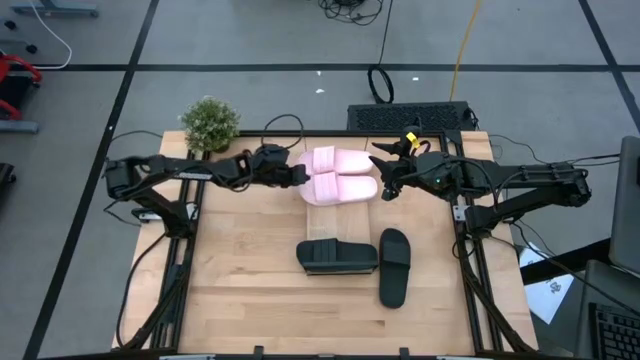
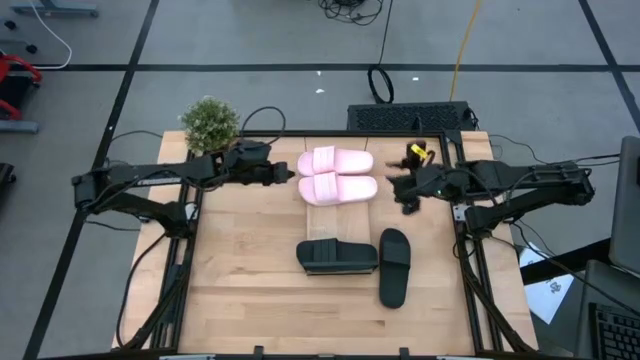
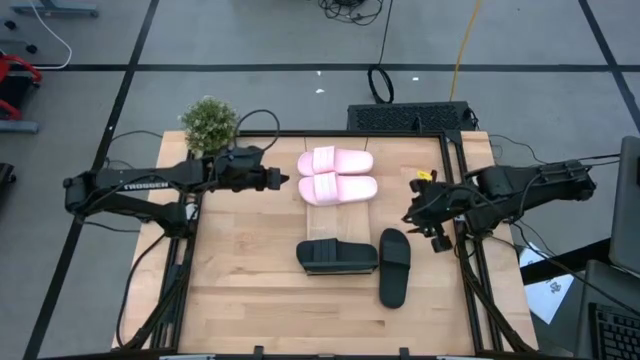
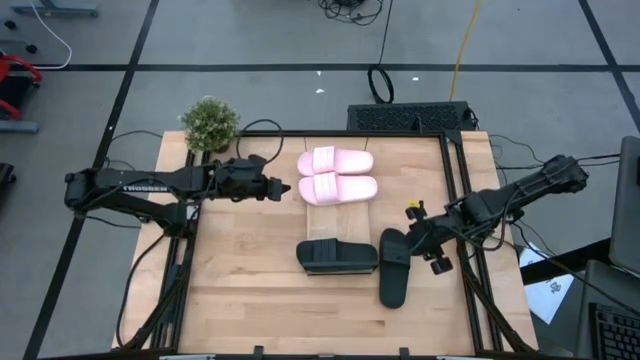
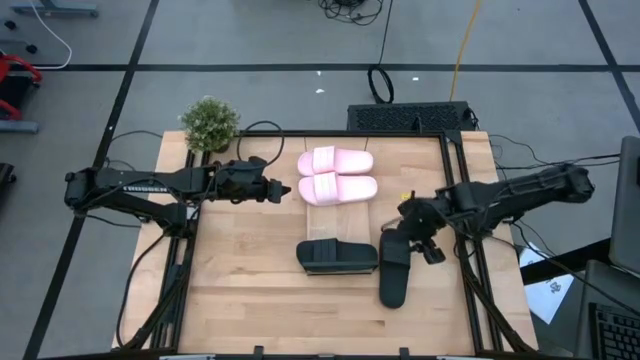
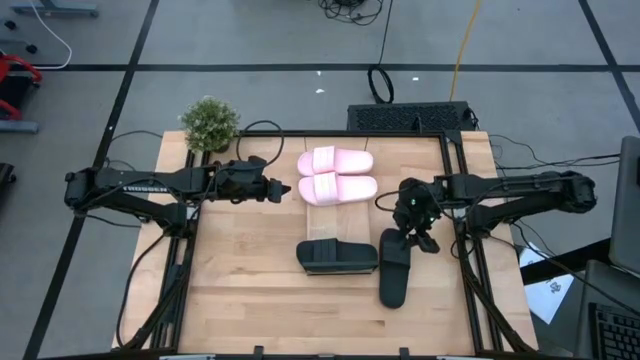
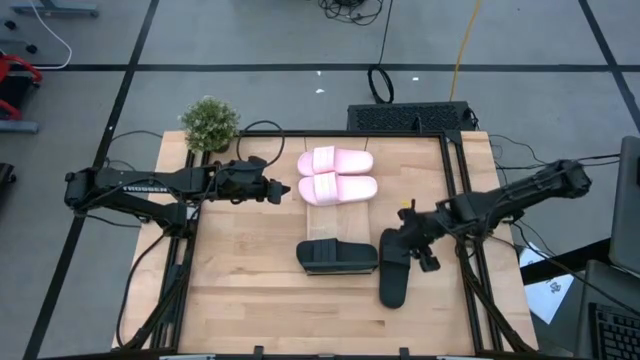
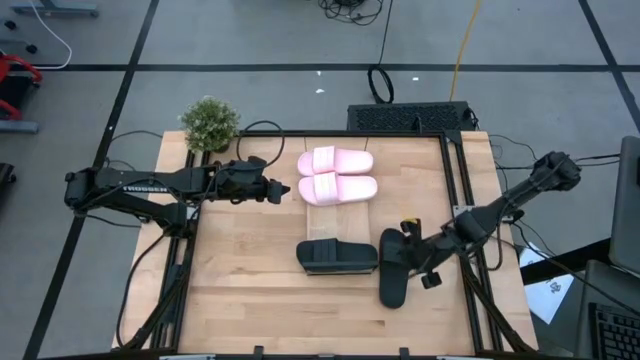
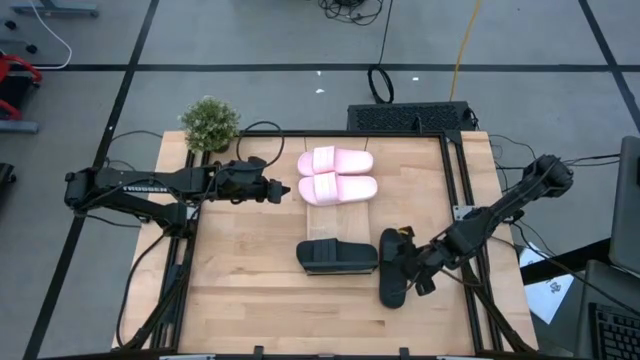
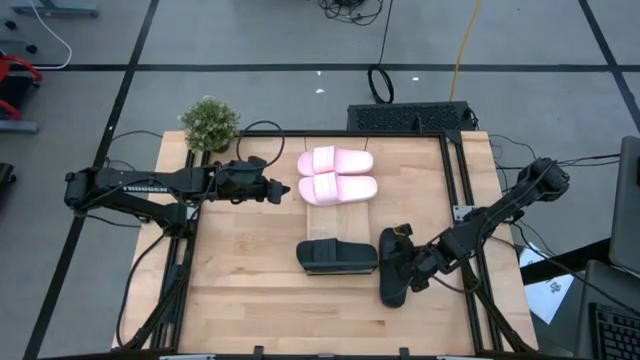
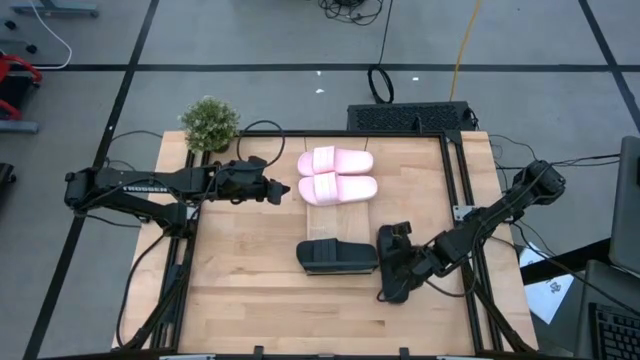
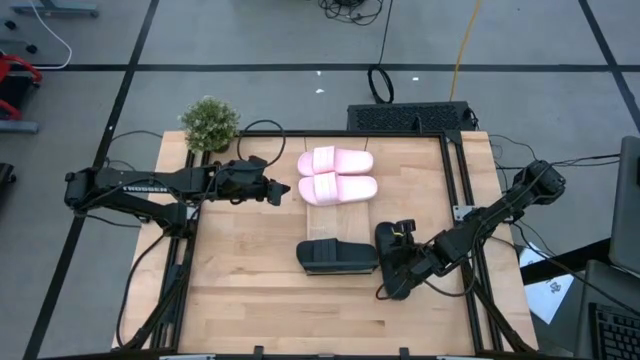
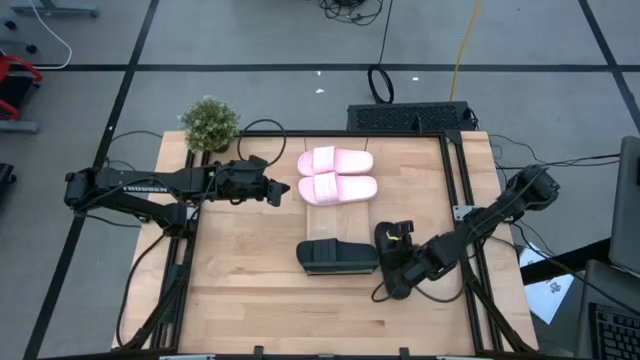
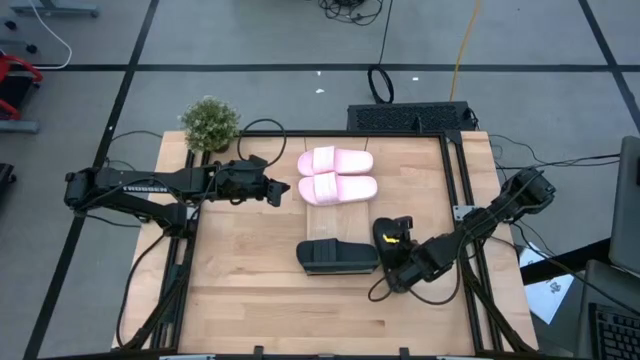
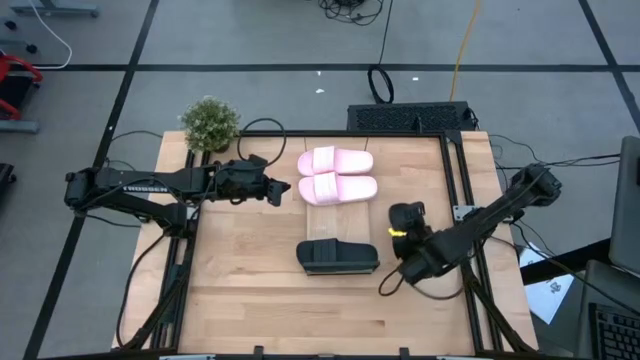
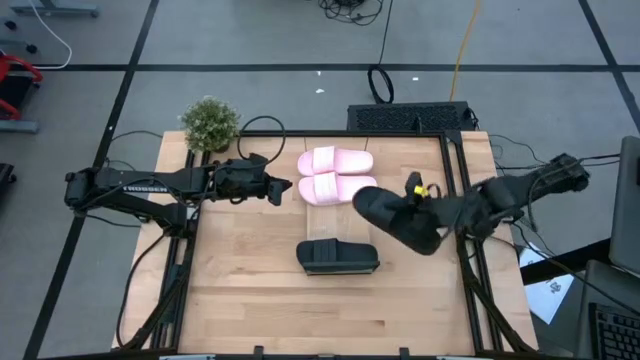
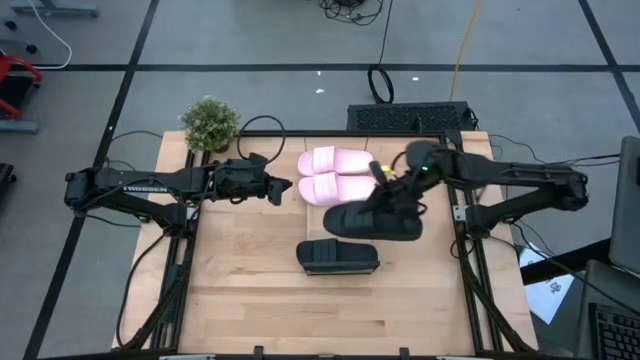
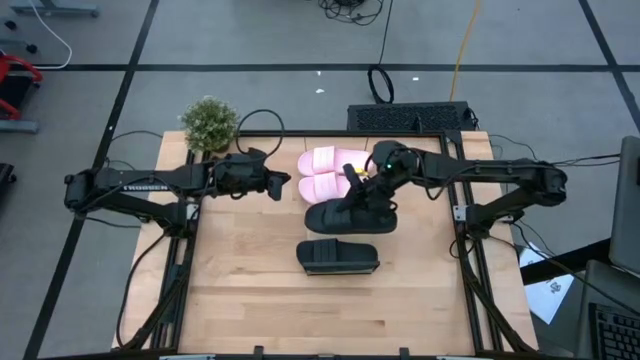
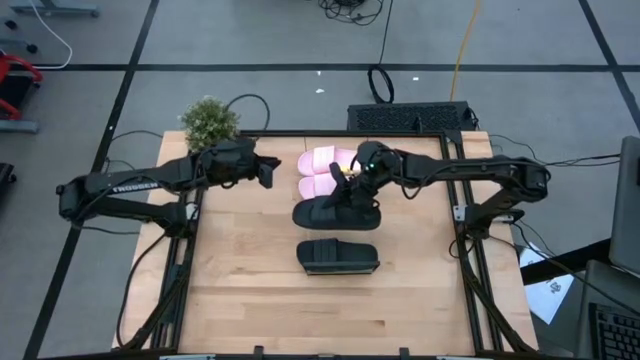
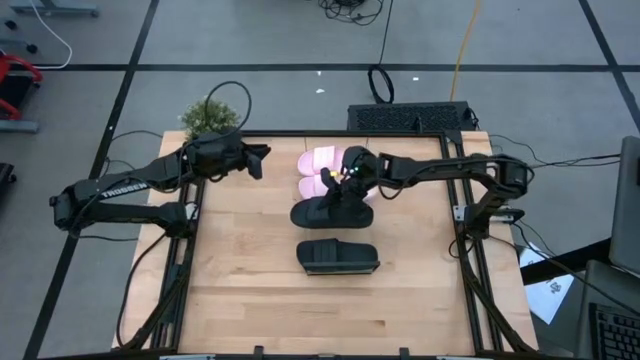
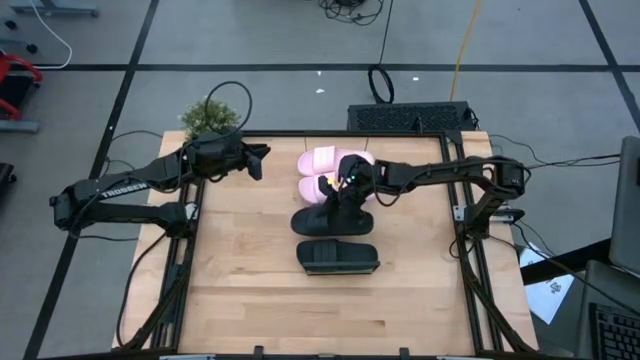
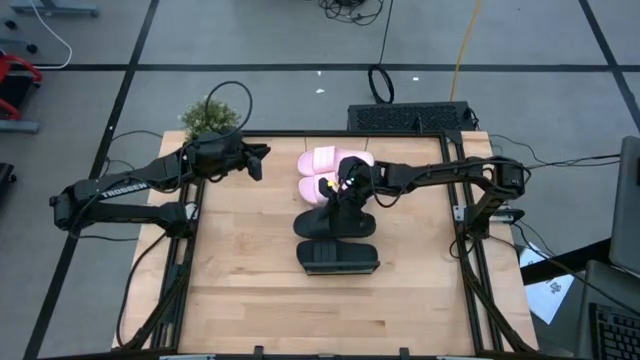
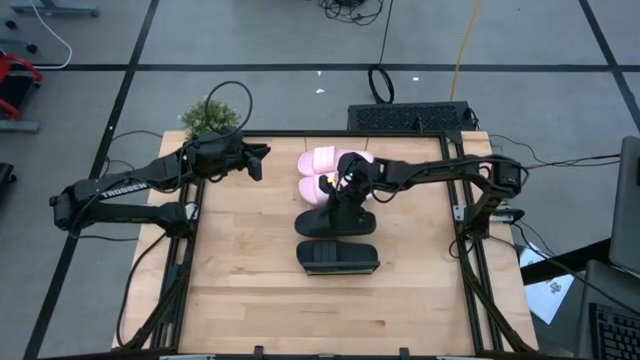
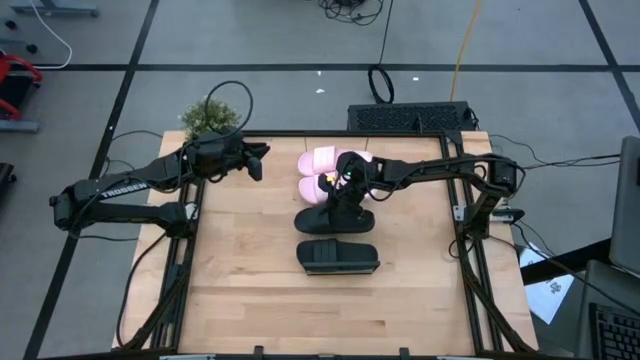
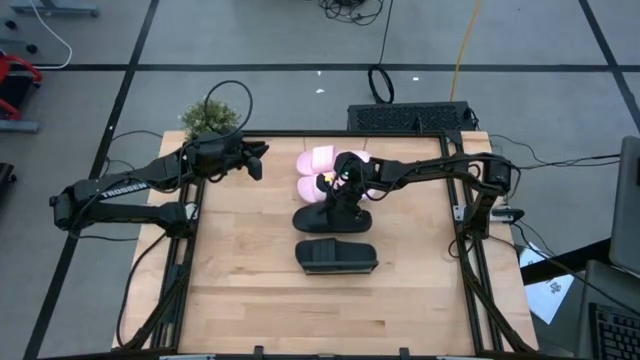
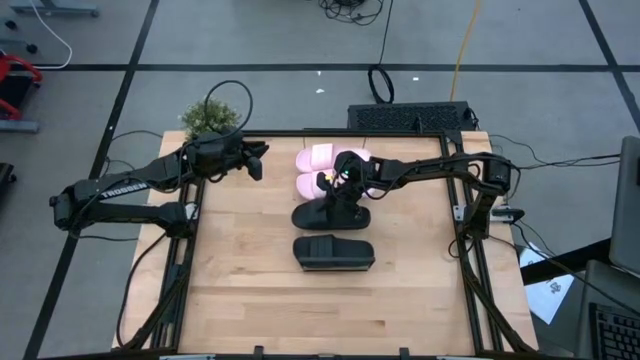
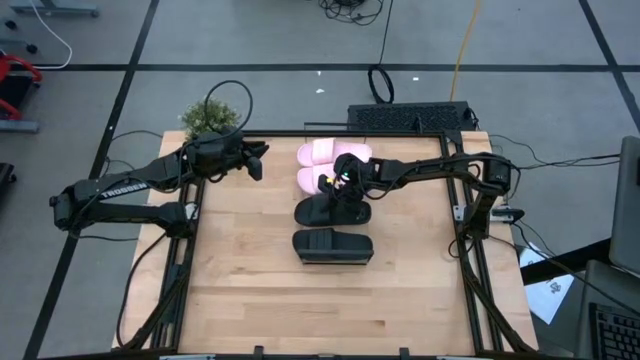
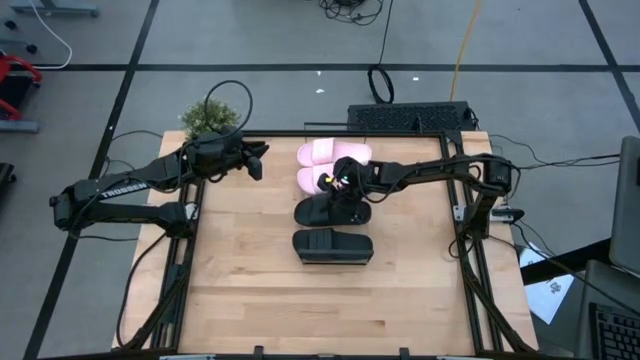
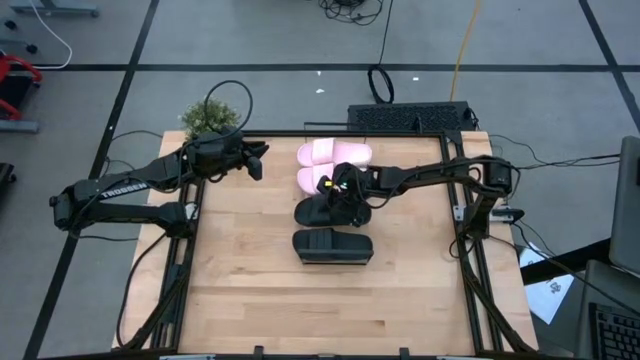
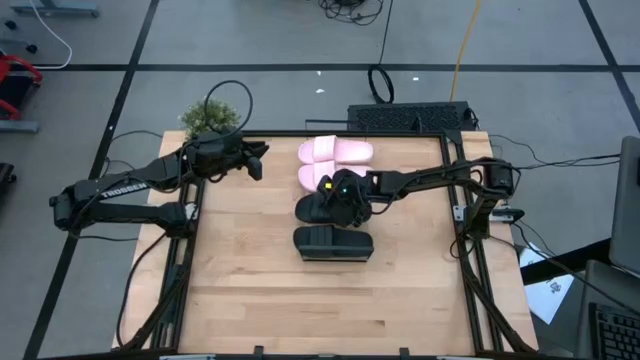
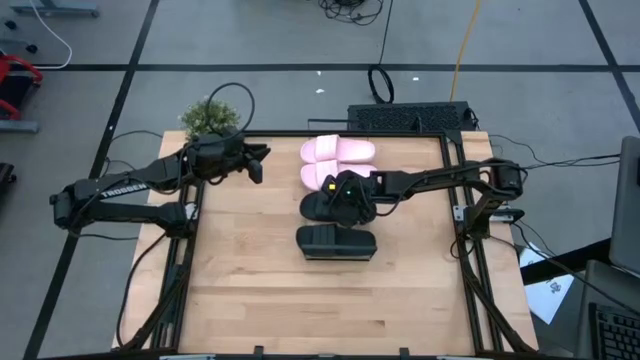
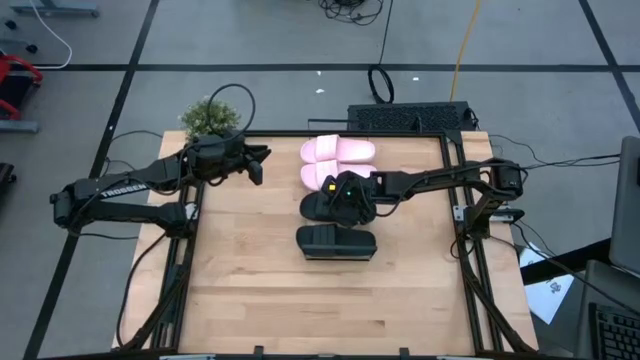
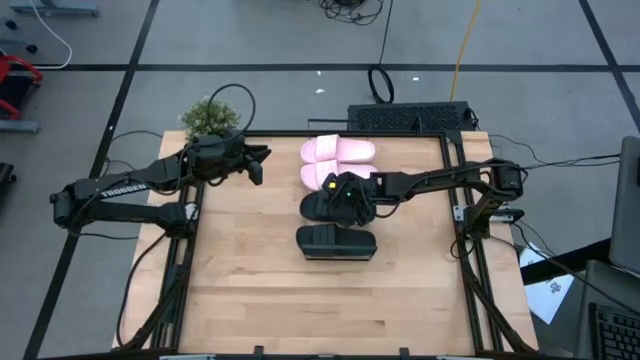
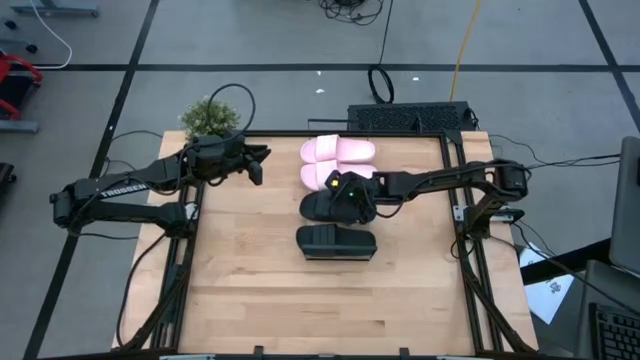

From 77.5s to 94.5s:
Task: Pick and place slides into the shelf
Put the black slipper on the shelf
